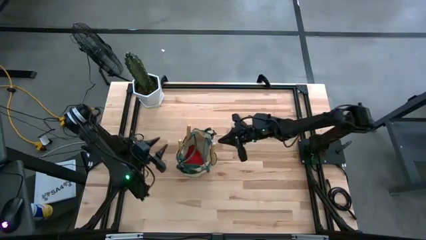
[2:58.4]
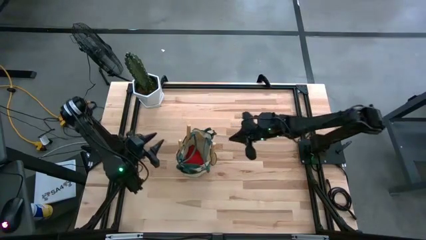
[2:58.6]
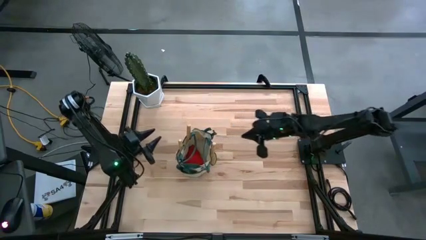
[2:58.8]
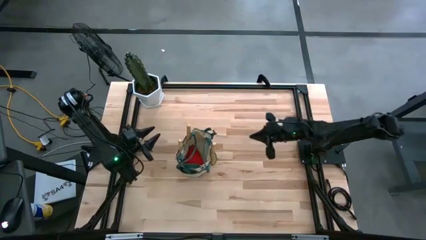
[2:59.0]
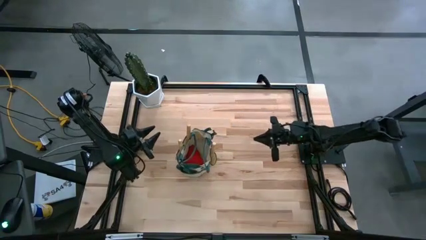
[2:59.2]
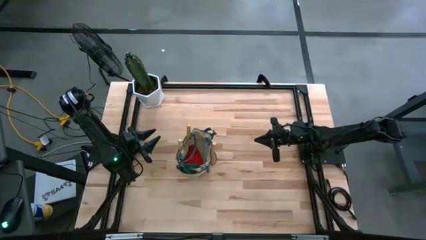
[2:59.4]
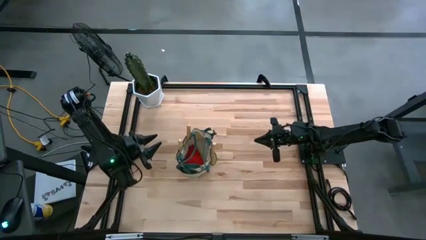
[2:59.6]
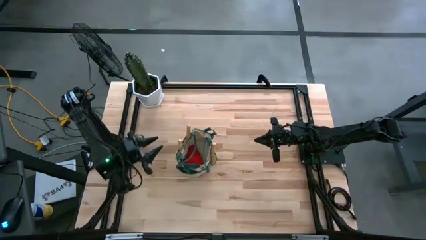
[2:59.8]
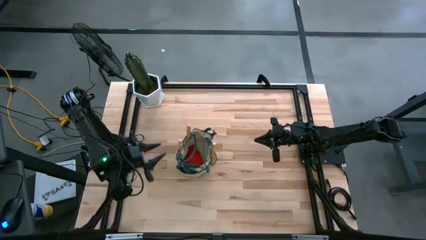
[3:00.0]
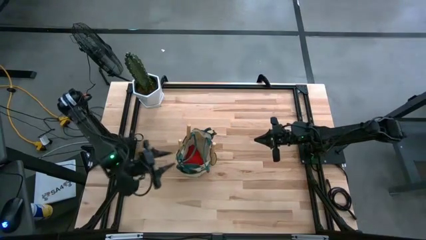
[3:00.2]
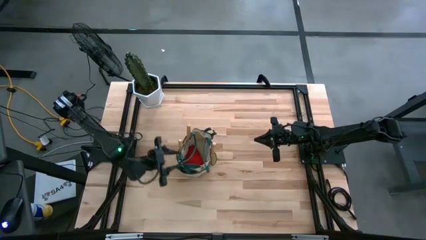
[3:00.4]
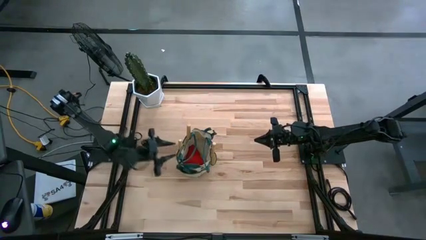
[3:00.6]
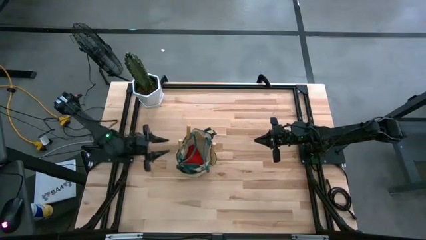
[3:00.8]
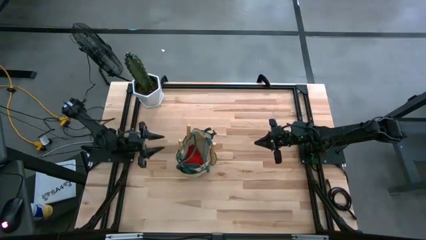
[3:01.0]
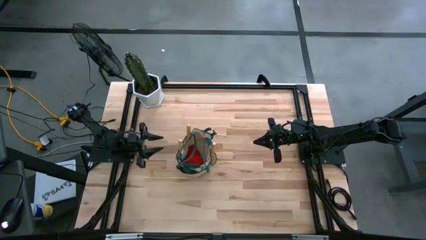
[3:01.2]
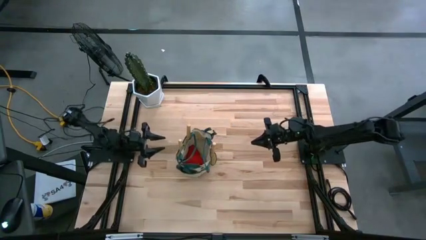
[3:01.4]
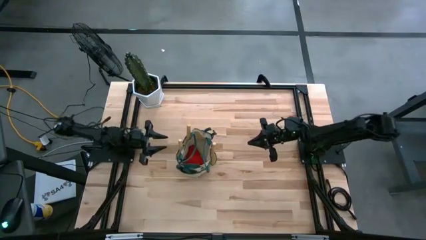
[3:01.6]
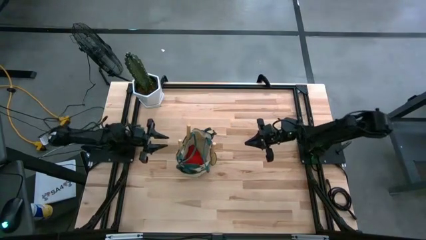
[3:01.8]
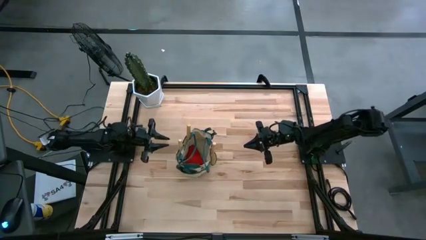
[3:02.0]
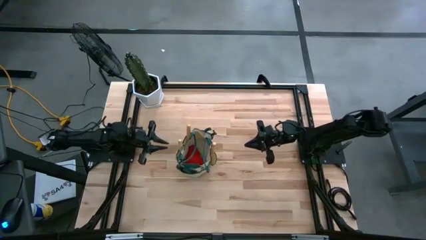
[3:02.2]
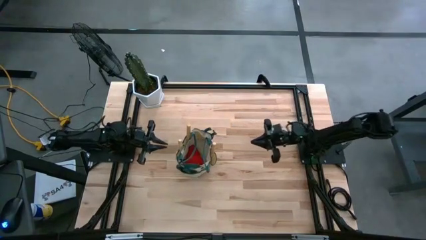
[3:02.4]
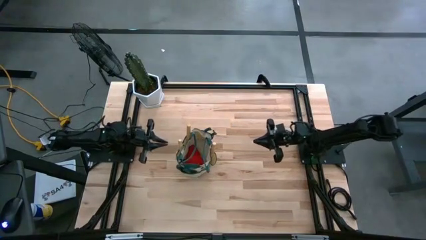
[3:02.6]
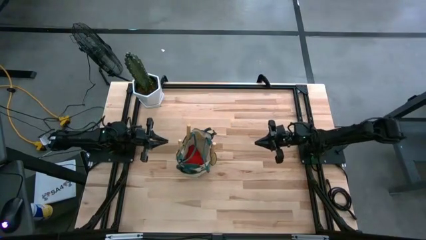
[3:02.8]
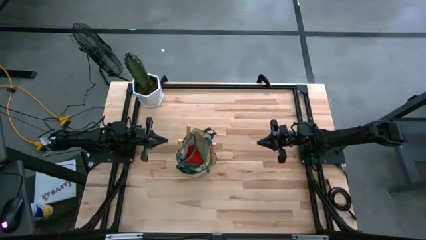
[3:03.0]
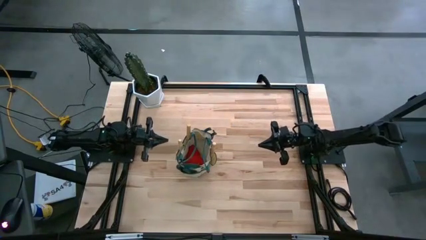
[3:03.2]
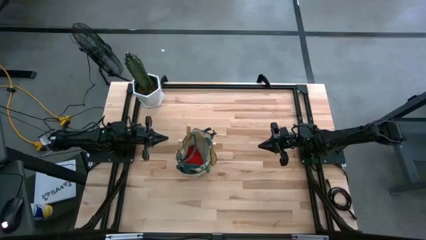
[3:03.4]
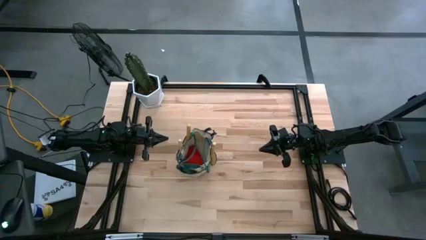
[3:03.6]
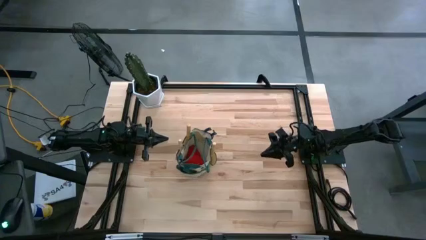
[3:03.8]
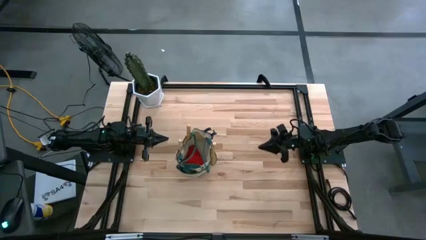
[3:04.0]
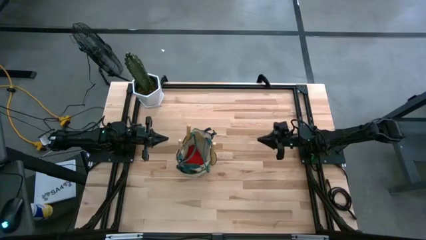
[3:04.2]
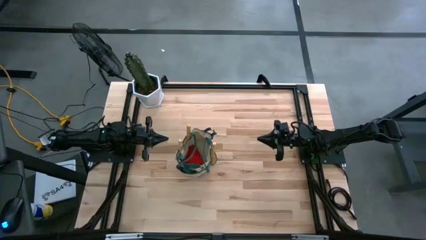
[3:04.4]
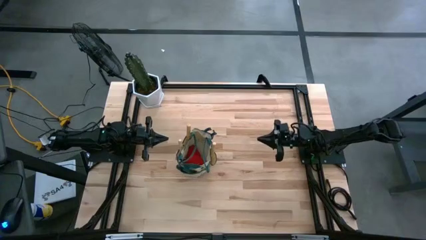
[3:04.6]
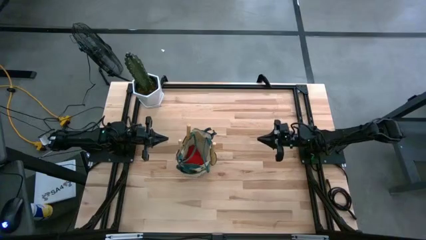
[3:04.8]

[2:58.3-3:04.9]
Task: Pick & Place Garden tools in Gardening bag
Return to Home Position

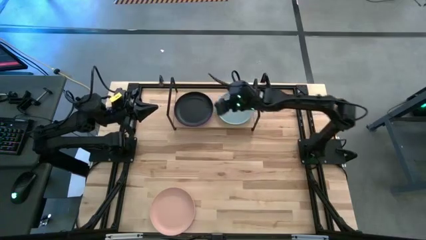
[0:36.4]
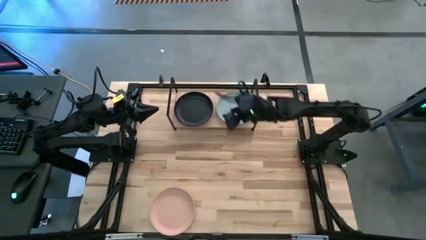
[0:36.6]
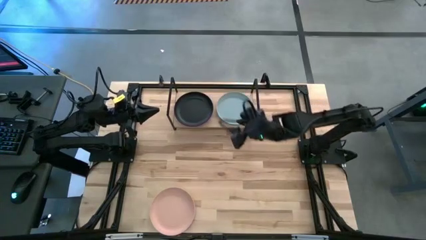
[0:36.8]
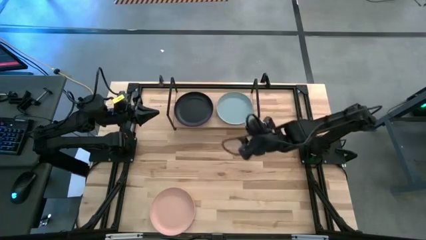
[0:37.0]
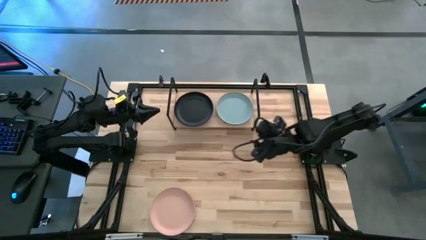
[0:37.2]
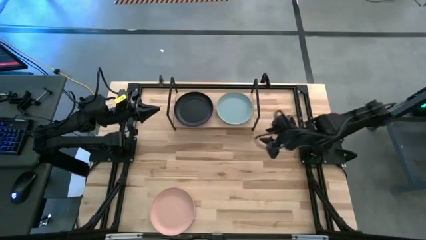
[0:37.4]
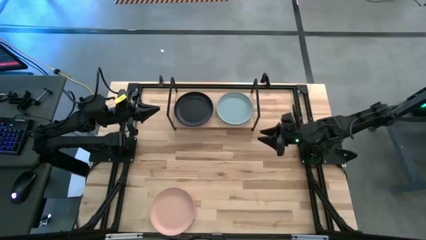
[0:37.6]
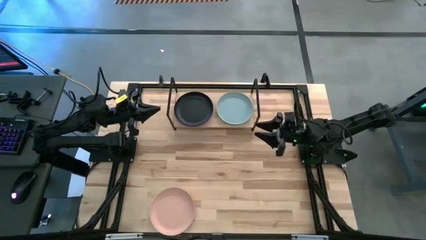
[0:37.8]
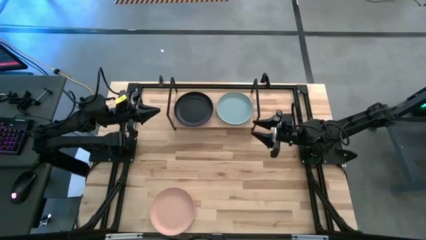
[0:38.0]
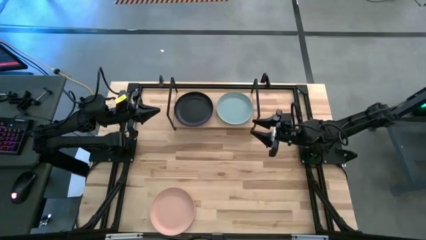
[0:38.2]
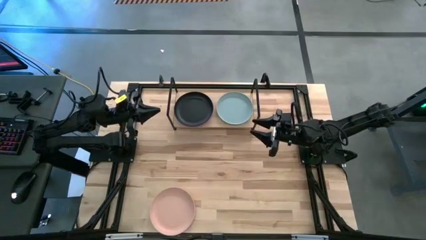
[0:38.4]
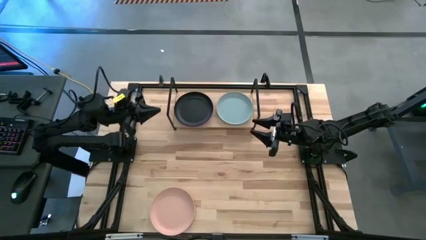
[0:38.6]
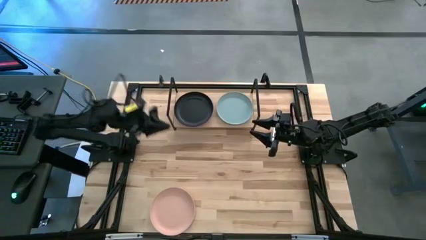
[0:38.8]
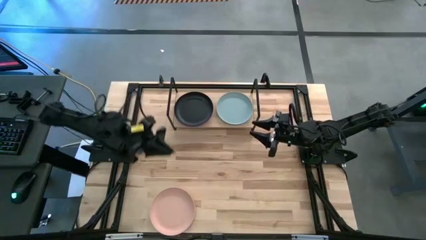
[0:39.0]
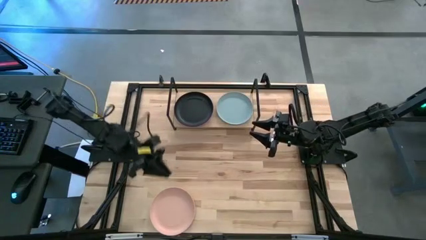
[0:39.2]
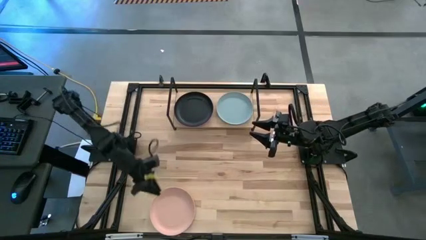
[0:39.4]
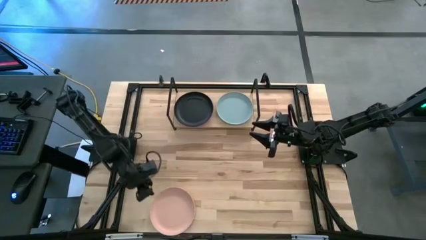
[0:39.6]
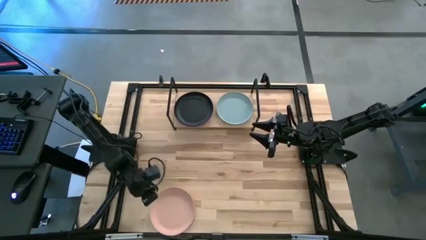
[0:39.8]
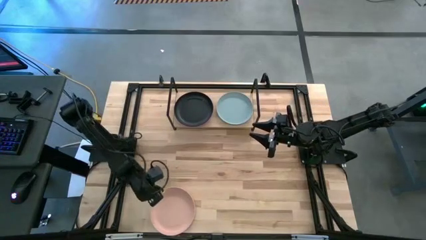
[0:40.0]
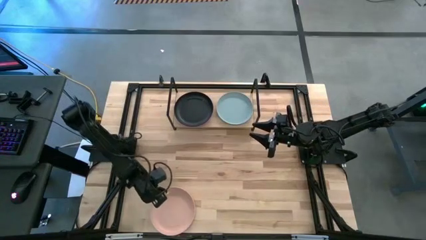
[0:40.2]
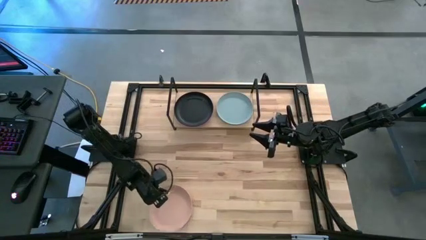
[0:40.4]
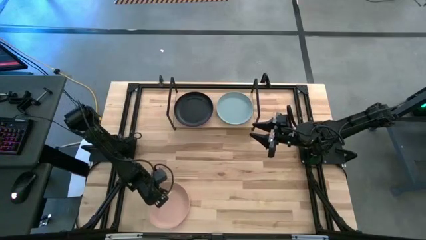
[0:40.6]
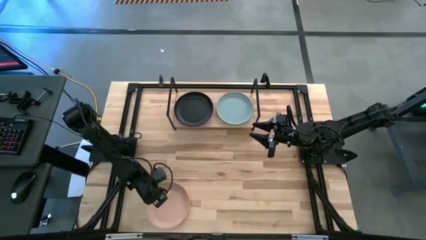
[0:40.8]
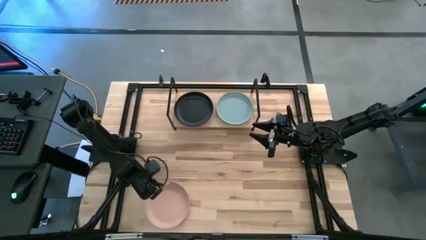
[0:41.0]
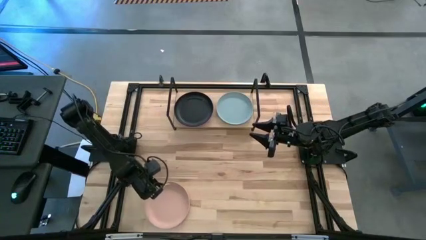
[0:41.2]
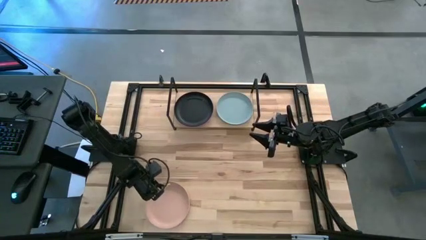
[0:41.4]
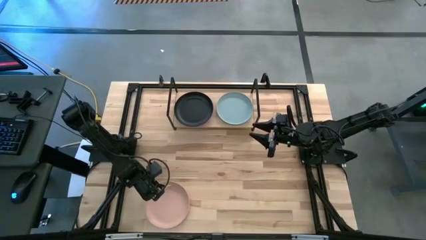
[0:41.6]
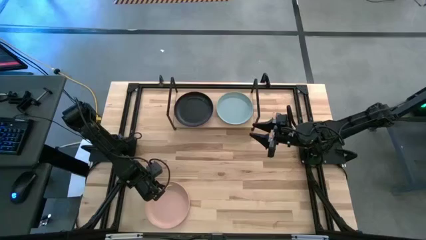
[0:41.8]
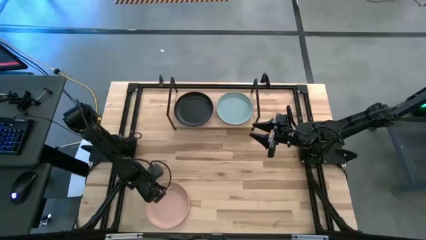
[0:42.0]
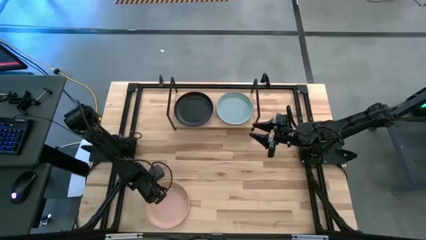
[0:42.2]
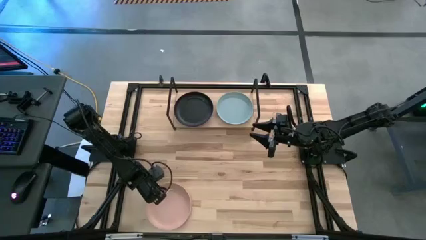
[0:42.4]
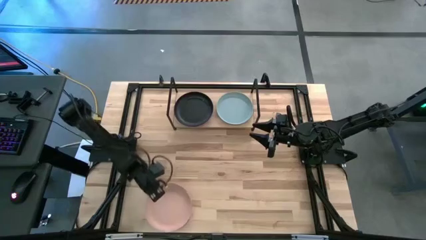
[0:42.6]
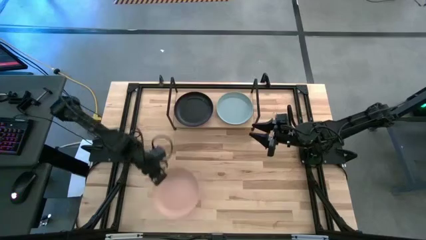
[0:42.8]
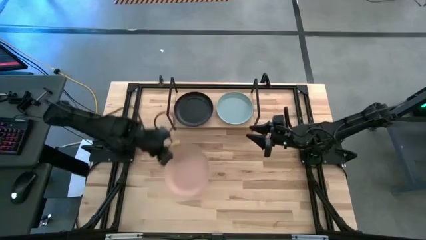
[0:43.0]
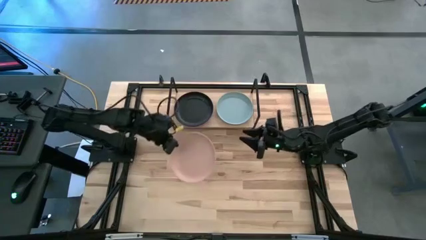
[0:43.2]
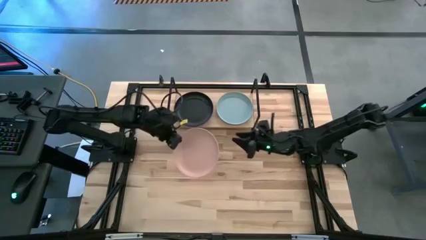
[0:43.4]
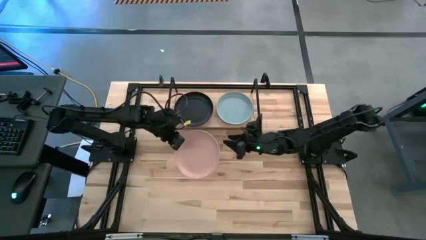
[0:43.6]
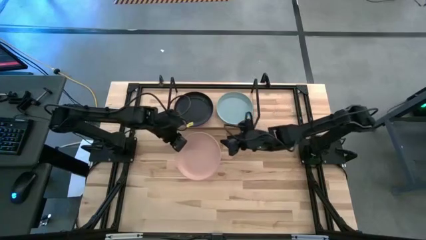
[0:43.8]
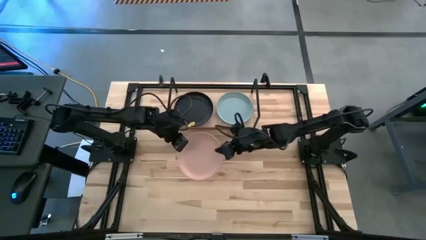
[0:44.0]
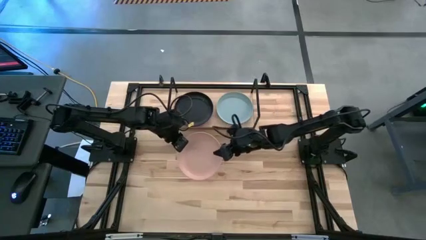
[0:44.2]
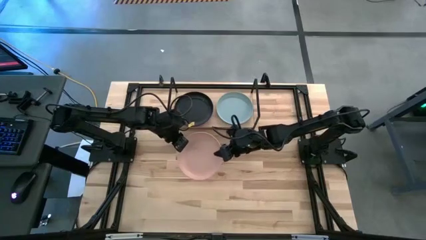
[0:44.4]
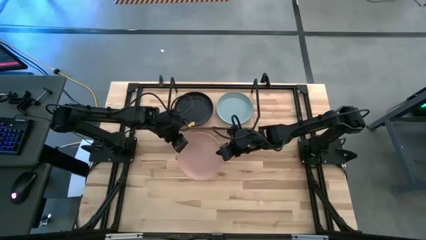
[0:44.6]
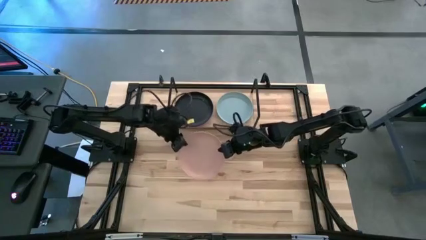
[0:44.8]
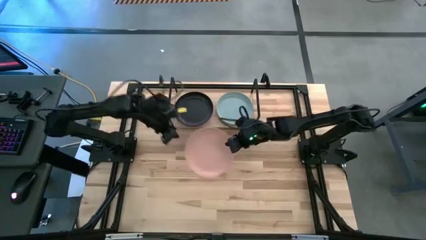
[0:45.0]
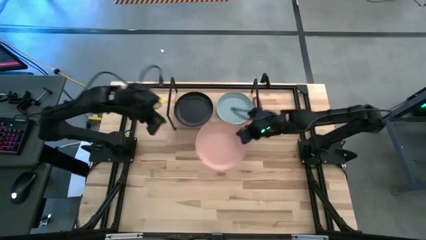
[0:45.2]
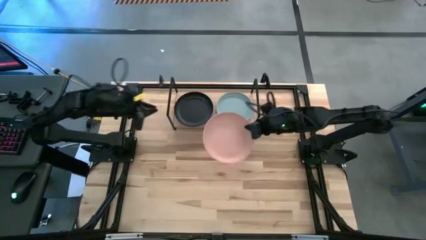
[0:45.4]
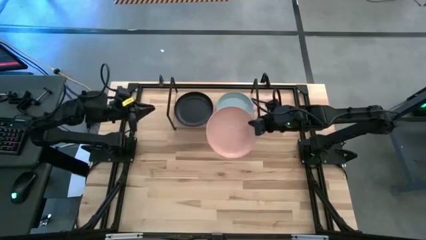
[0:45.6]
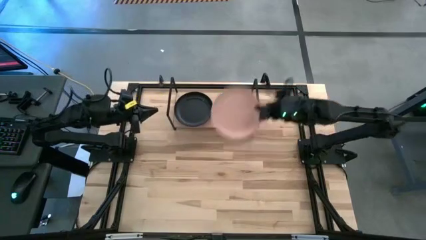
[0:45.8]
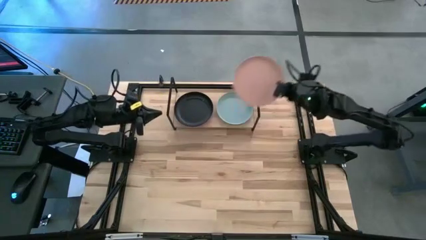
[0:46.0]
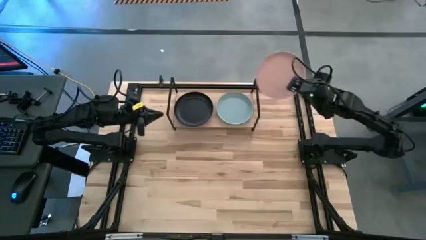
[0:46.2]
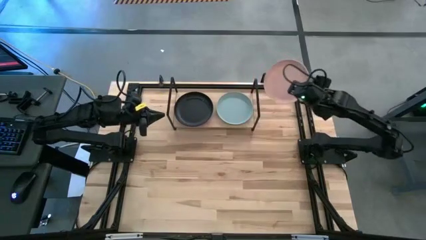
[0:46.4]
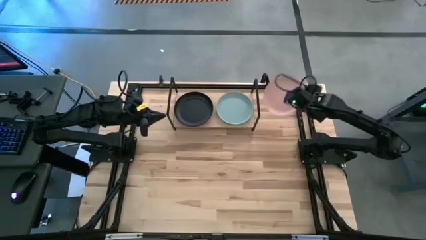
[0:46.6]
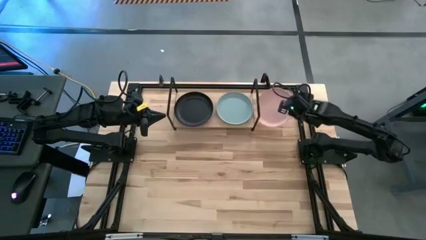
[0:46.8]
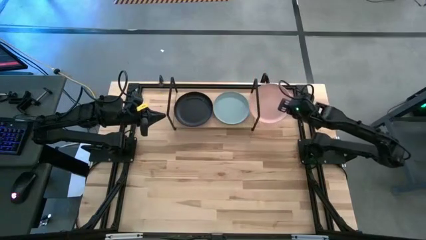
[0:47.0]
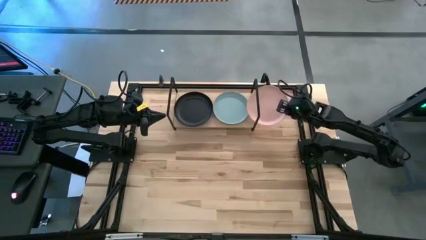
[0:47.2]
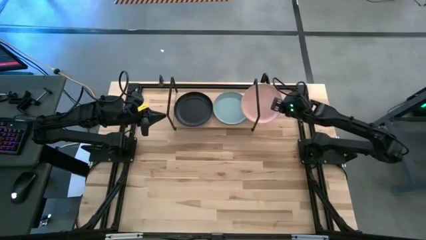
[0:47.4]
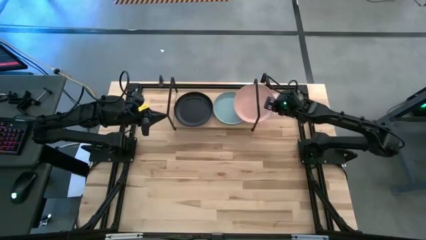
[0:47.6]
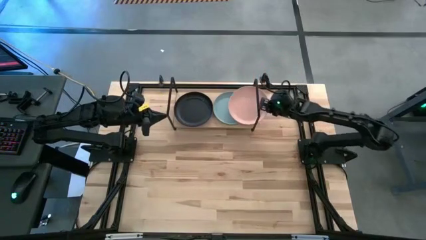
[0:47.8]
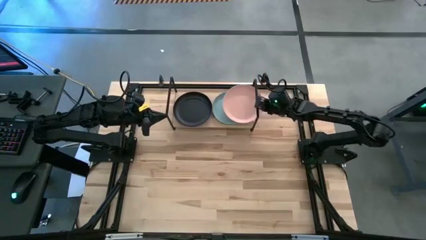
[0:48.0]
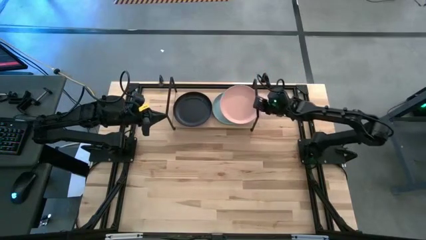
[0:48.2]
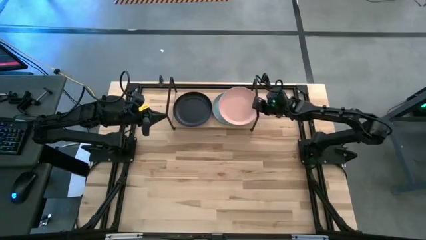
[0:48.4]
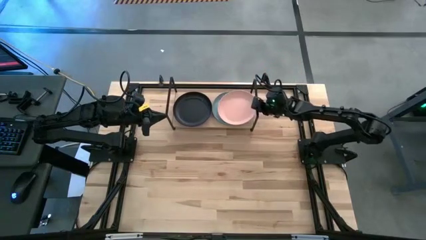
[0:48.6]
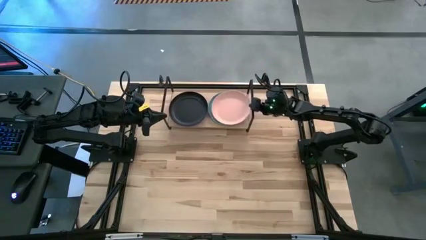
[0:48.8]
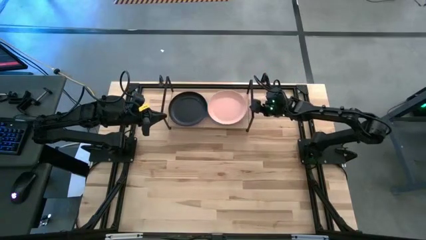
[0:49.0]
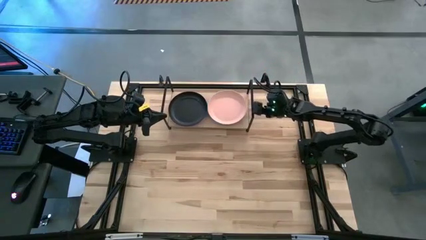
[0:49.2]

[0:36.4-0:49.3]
Task: Place and stack plates onto a shelf
Stack the pink plate on top of the gray plate on the shelf
